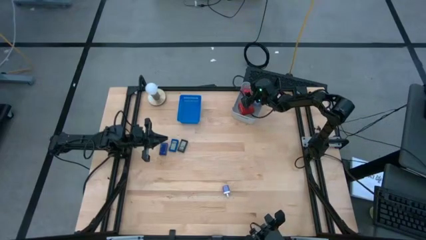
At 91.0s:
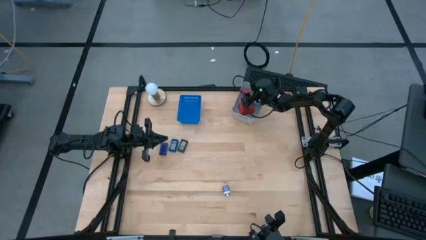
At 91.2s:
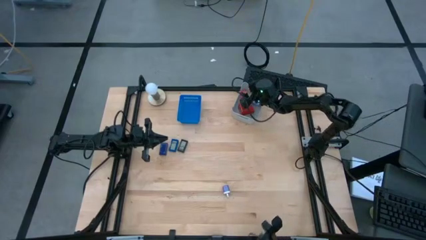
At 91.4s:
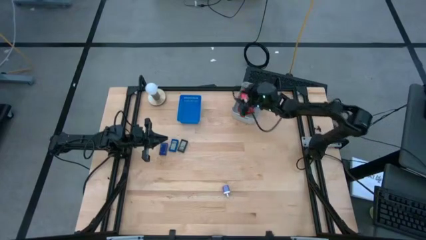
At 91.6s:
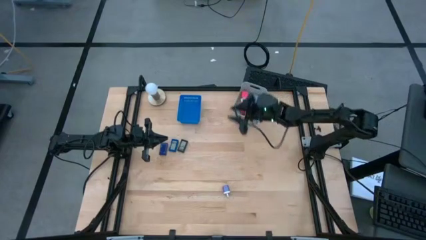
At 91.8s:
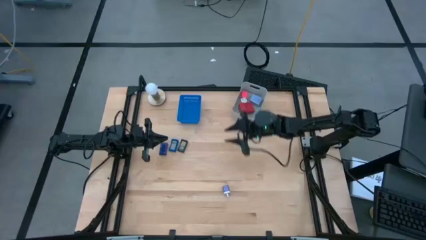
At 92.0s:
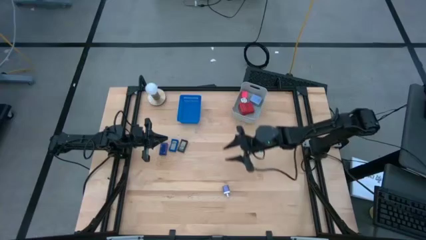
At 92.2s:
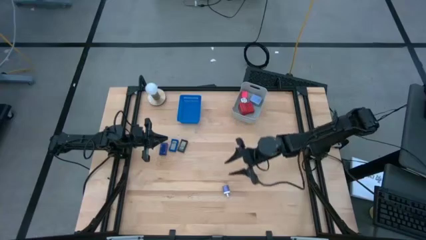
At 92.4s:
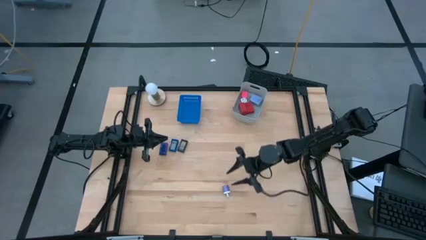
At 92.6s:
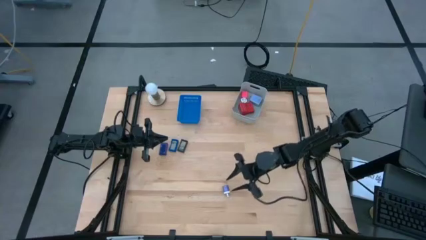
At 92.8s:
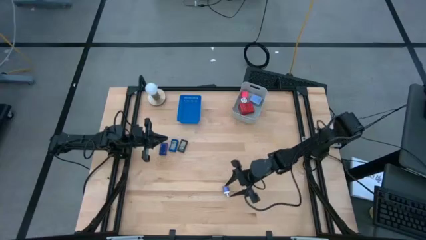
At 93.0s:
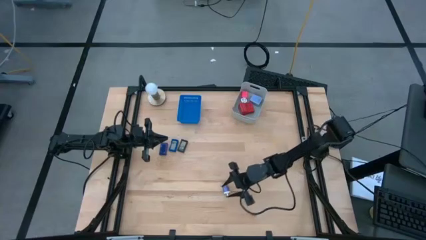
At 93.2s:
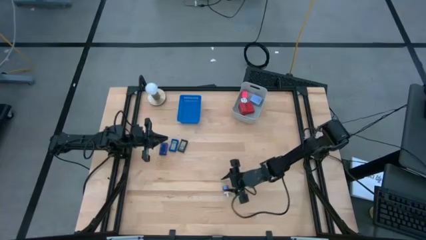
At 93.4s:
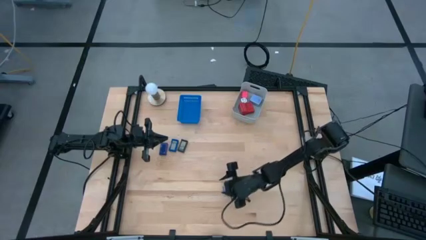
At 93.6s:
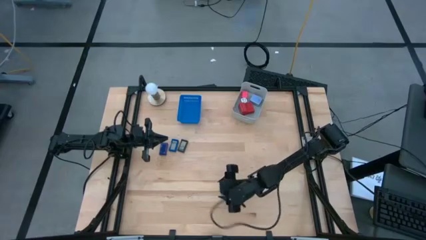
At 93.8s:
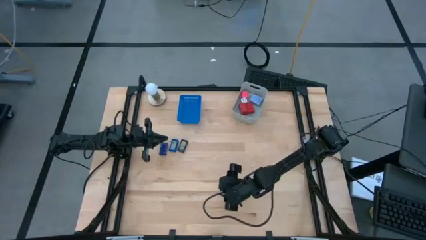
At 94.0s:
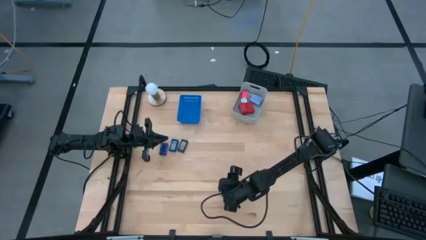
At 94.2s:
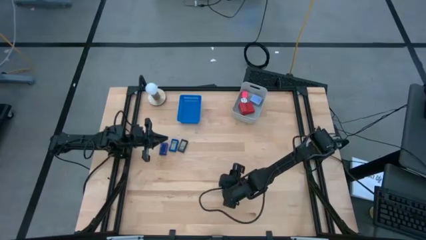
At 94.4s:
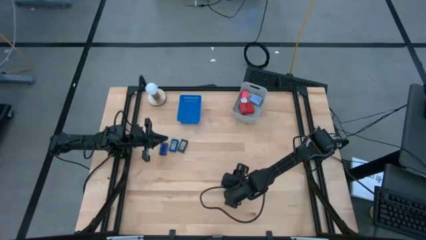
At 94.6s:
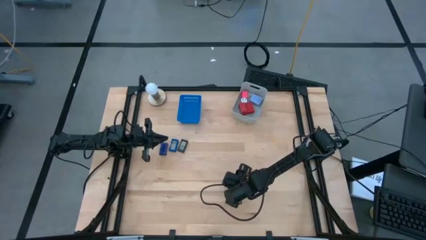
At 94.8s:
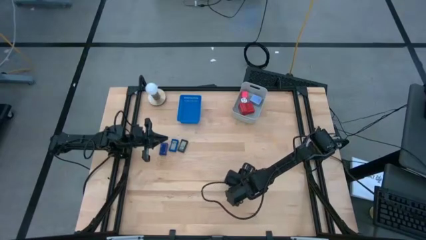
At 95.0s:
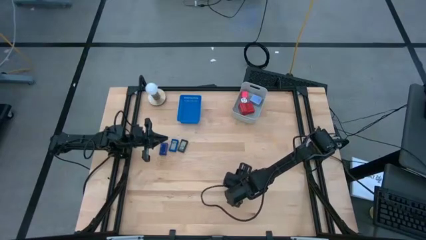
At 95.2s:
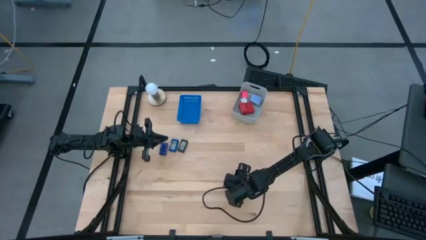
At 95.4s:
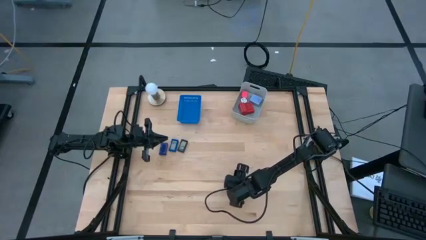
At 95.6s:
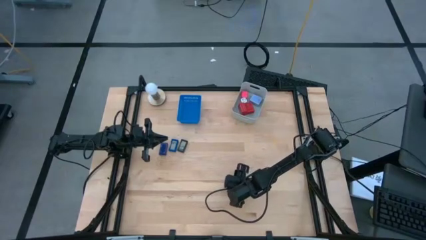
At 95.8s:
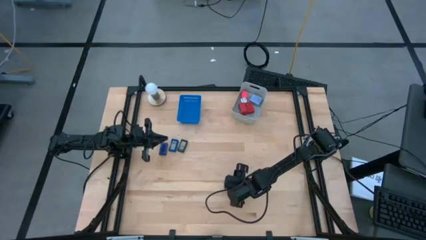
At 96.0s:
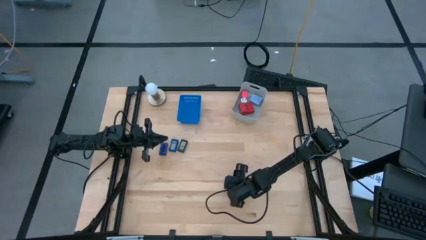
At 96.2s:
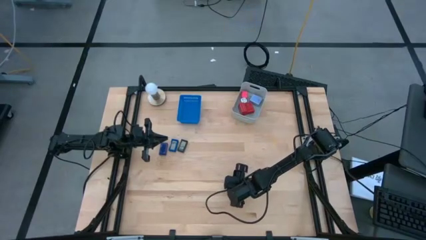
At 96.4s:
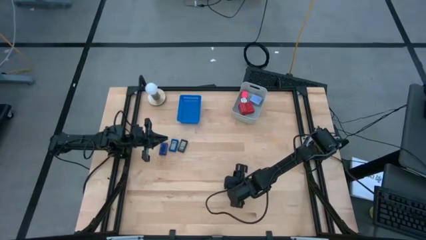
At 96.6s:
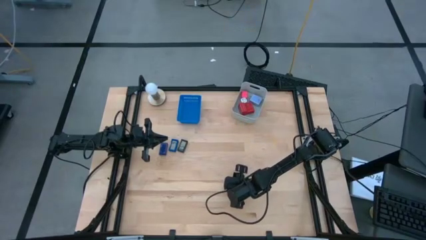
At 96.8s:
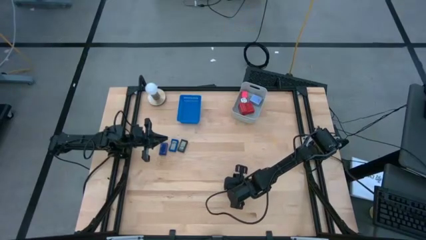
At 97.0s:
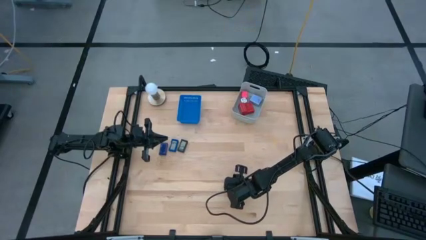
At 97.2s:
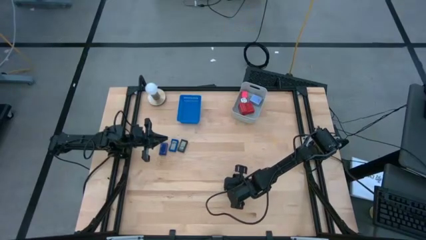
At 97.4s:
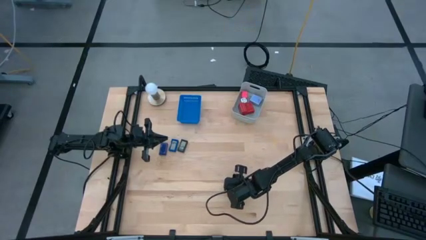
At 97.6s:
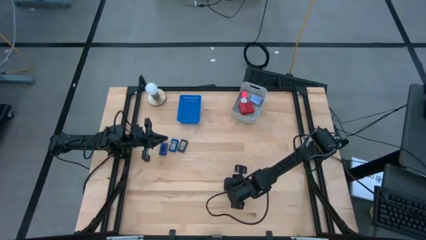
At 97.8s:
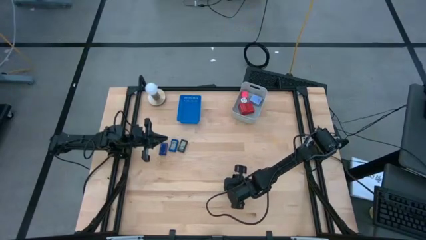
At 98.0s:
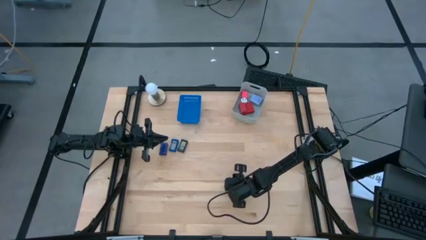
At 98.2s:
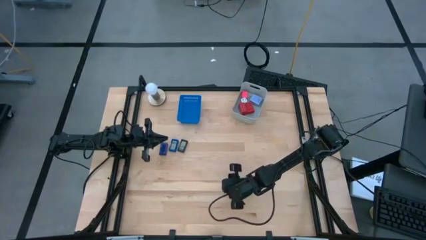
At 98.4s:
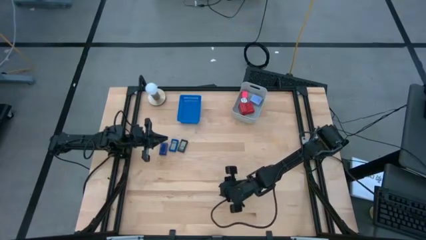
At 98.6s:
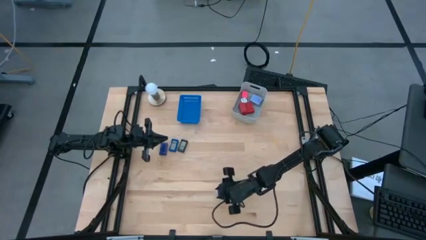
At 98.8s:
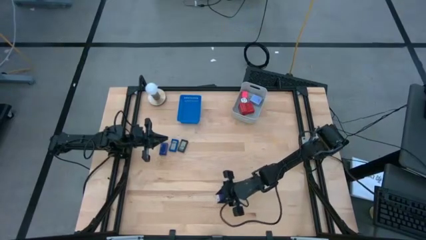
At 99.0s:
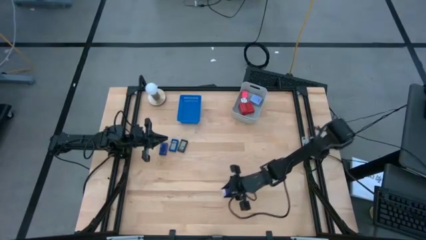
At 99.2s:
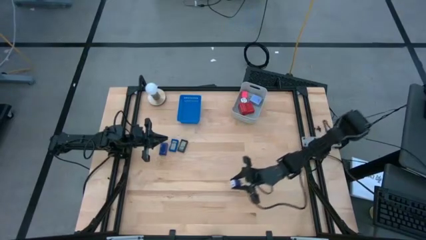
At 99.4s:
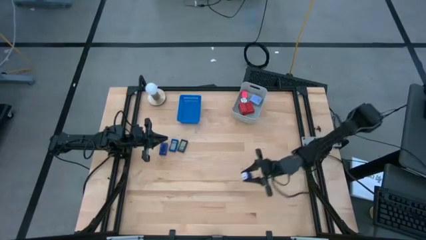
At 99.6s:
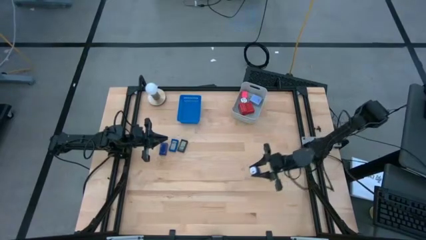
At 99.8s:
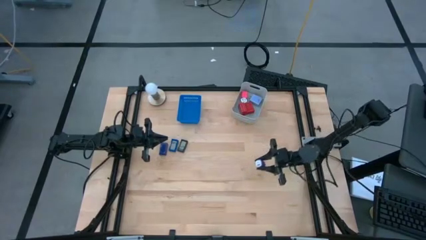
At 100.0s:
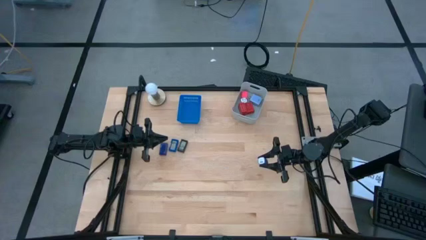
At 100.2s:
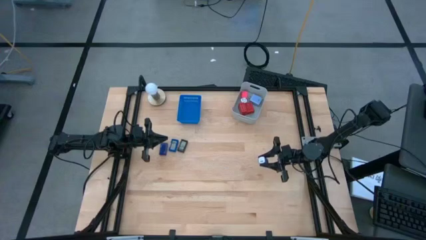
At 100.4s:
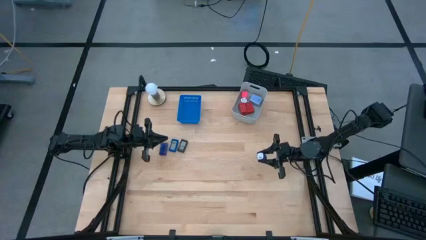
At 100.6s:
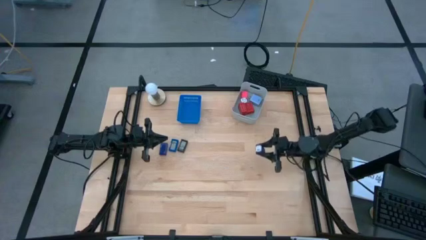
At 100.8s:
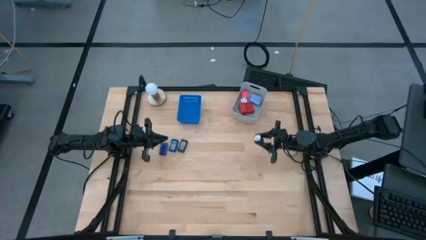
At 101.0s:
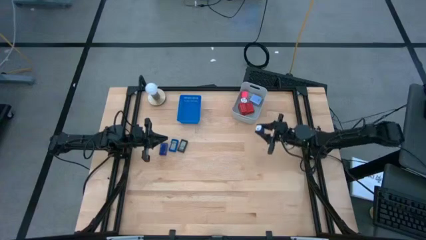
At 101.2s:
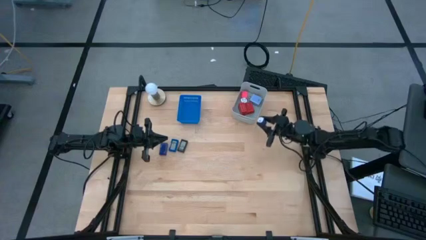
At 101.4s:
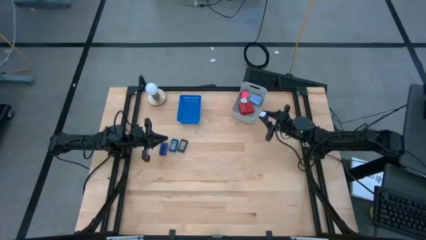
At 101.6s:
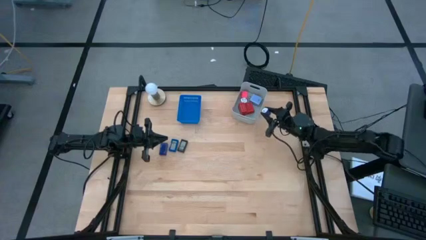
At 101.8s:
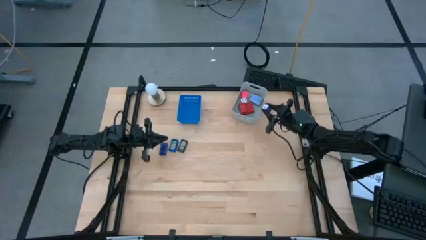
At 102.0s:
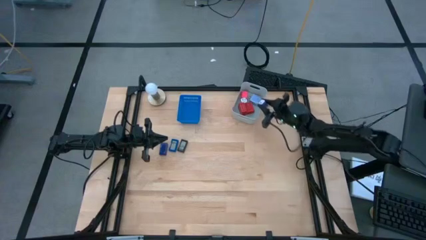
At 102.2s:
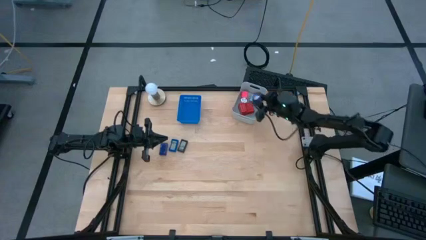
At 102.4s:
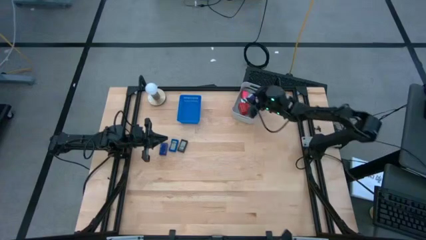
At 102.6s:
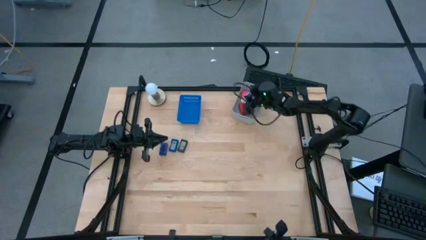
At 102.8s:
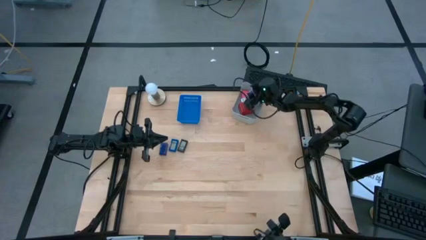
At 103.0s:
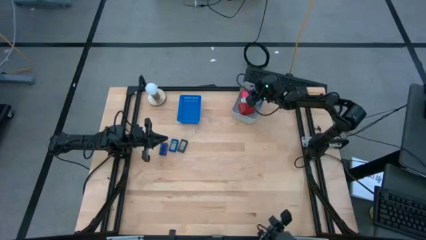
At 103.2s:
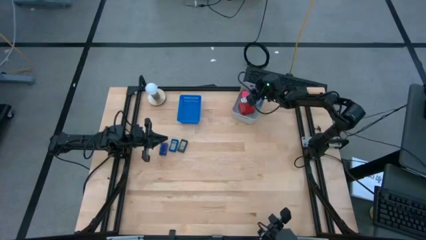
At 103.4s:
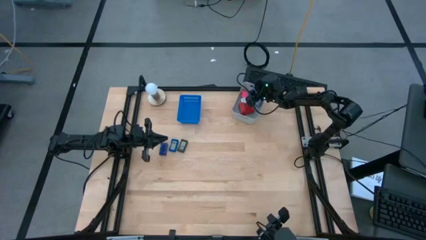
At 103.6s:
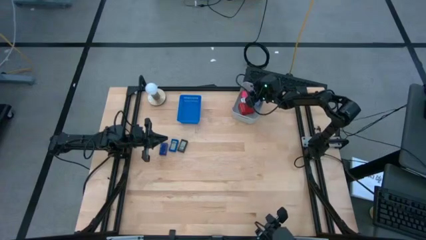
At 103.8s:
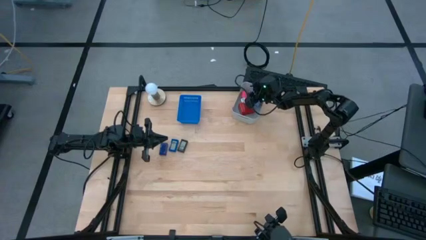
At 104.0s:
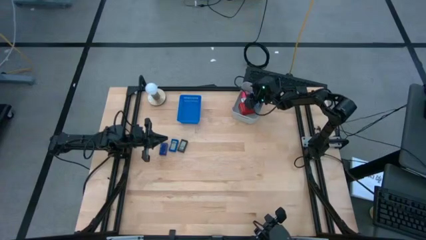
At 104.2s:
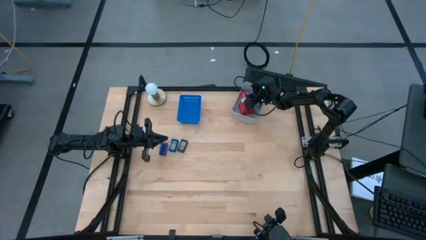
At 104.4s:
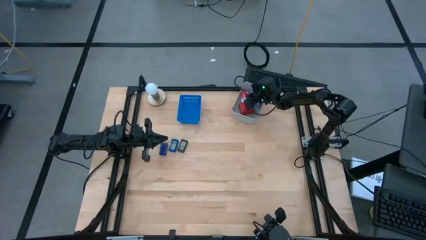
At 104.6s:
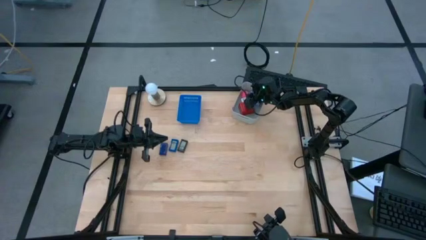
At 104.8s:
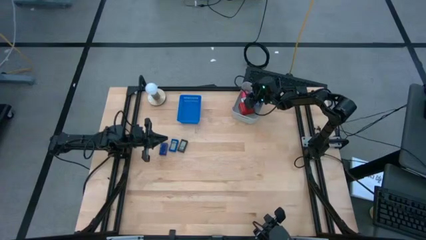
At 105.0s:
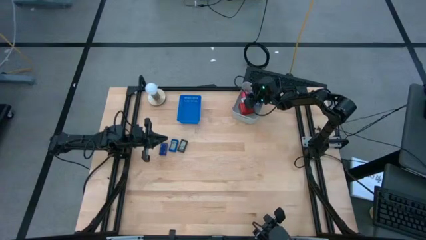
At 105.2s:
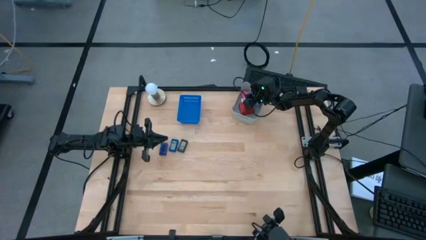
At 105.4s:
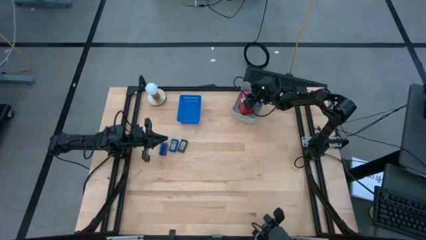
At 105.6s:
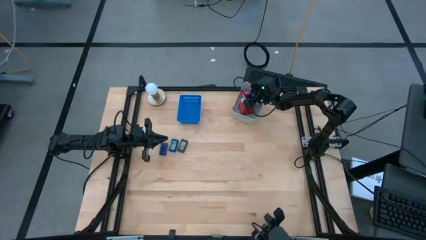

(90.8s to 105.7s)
Task: Pick & Place Office items
Put the violet charger adapter into the gray bin
